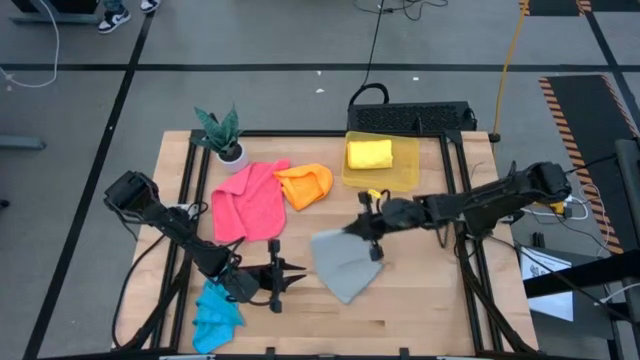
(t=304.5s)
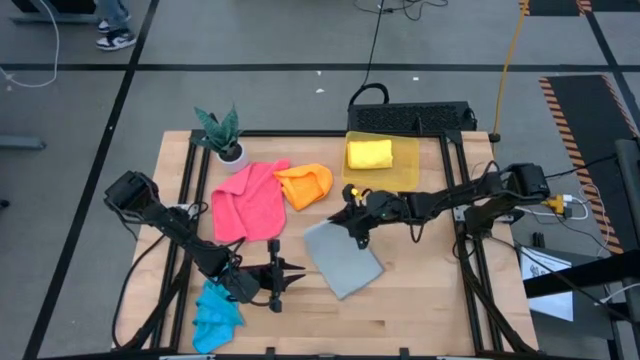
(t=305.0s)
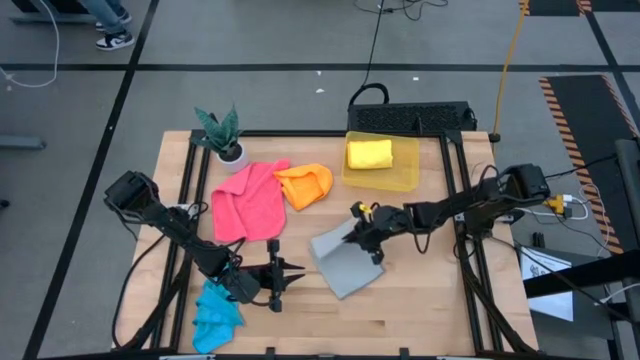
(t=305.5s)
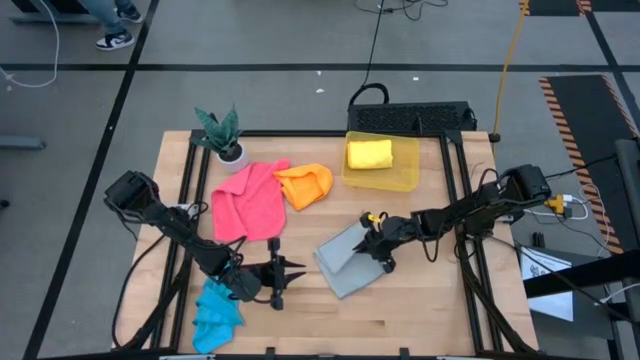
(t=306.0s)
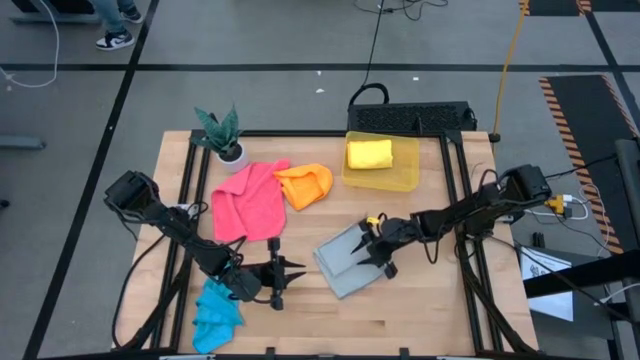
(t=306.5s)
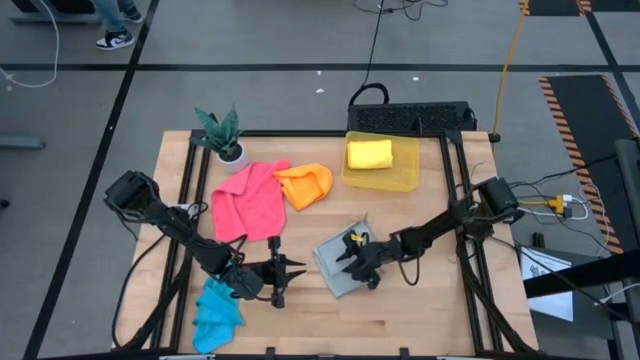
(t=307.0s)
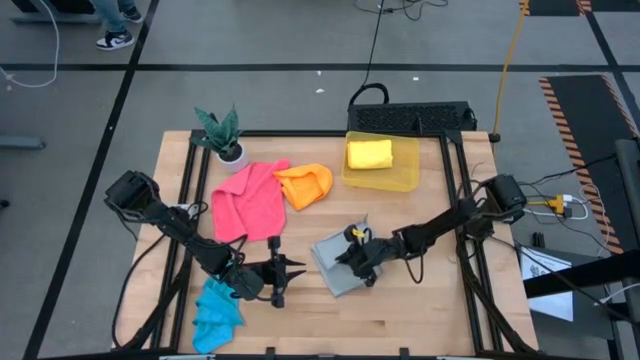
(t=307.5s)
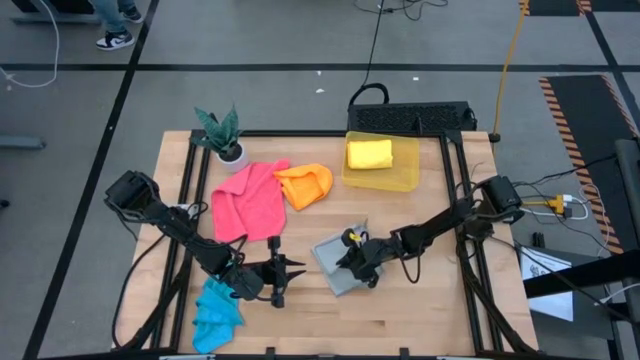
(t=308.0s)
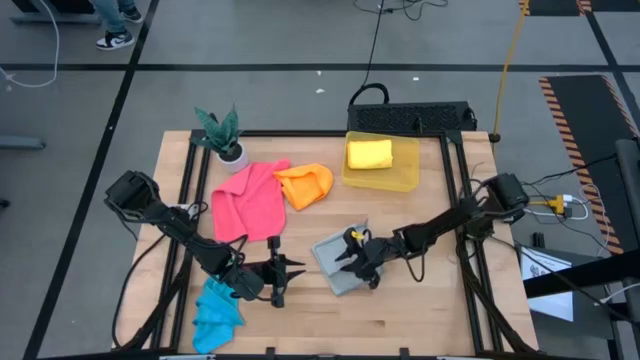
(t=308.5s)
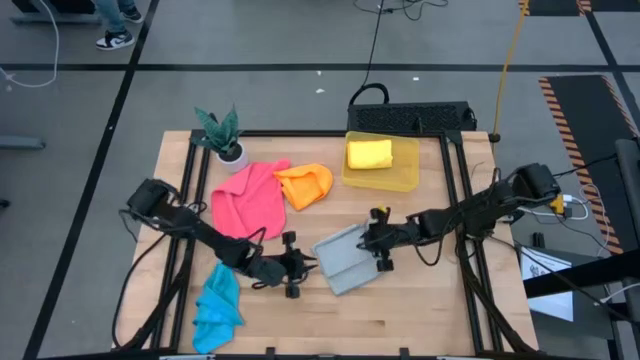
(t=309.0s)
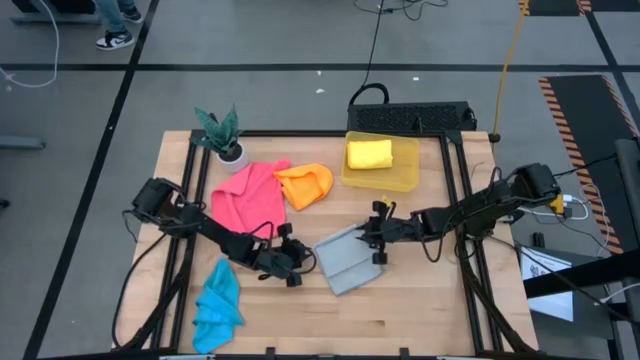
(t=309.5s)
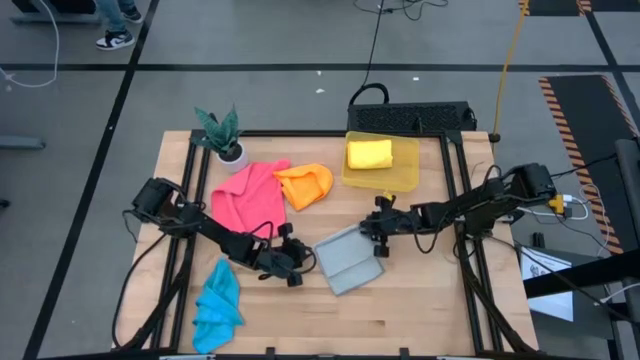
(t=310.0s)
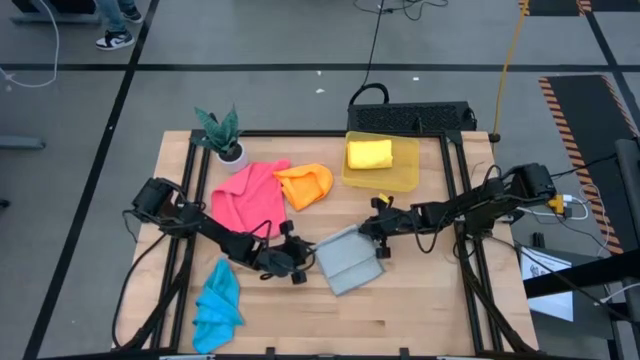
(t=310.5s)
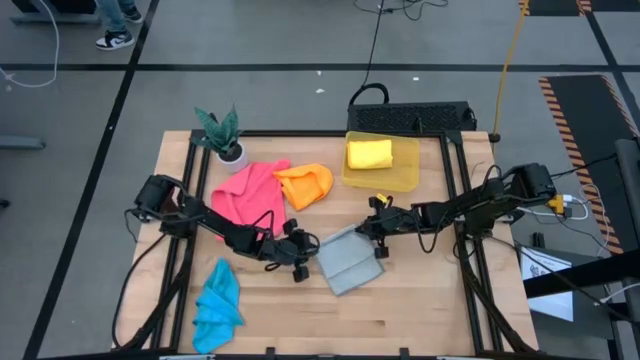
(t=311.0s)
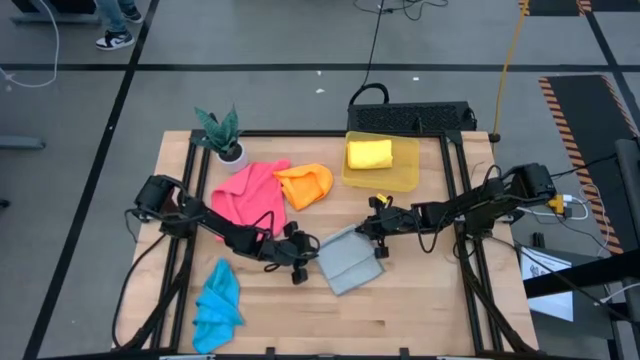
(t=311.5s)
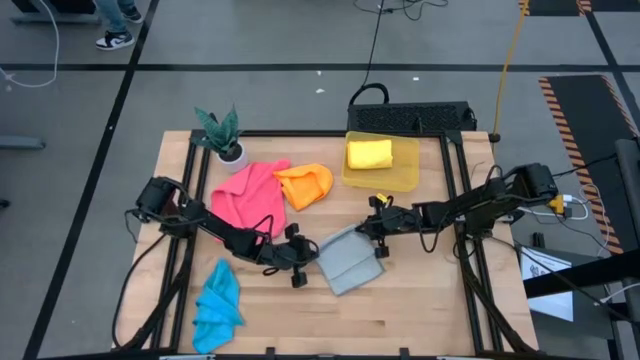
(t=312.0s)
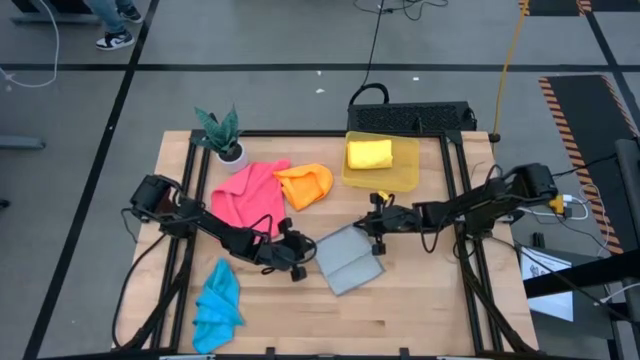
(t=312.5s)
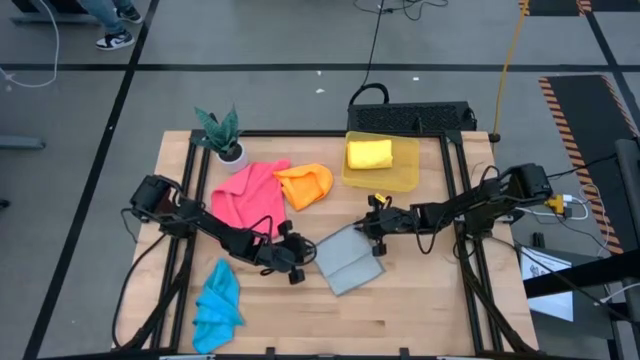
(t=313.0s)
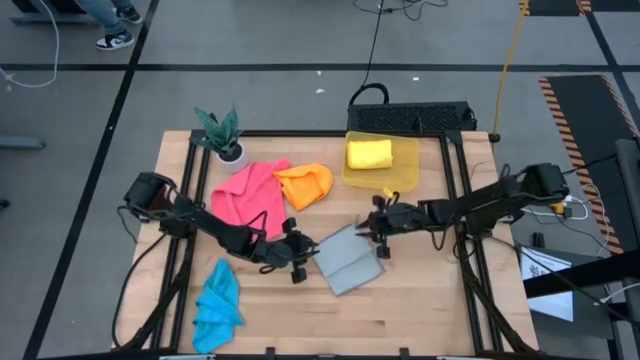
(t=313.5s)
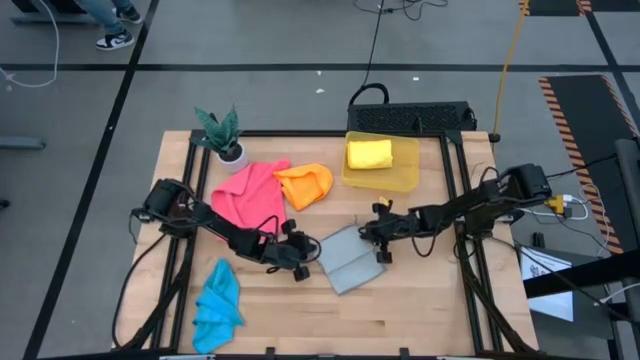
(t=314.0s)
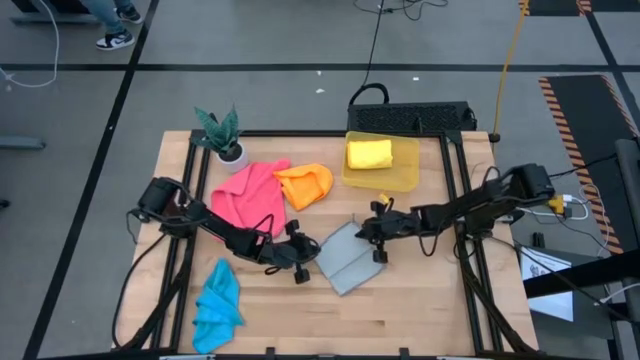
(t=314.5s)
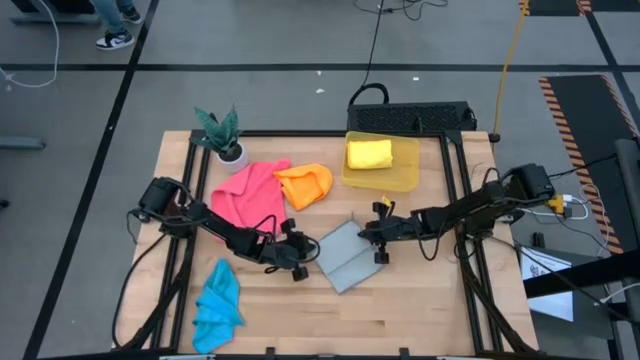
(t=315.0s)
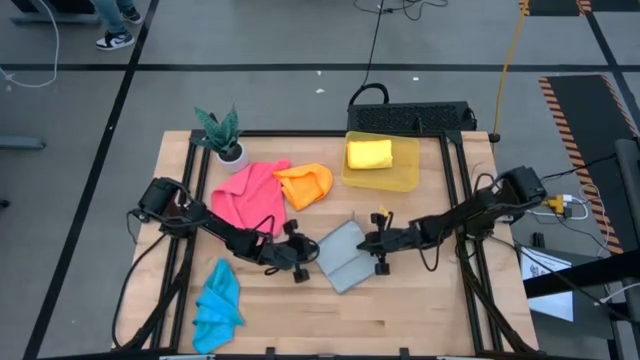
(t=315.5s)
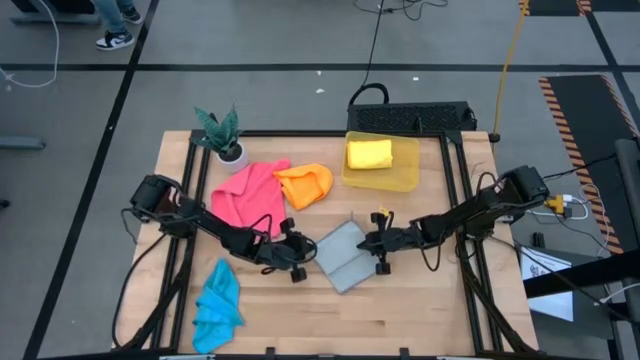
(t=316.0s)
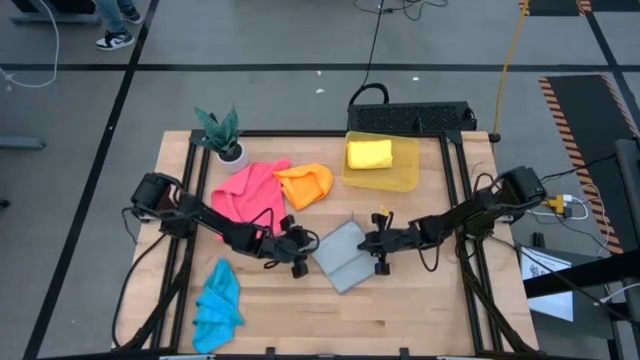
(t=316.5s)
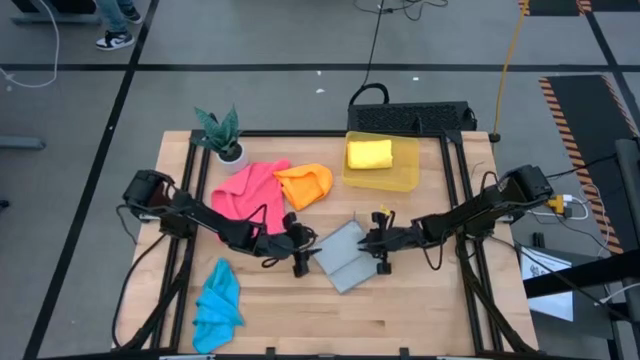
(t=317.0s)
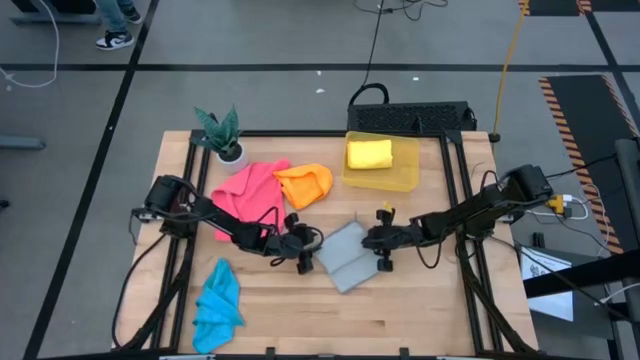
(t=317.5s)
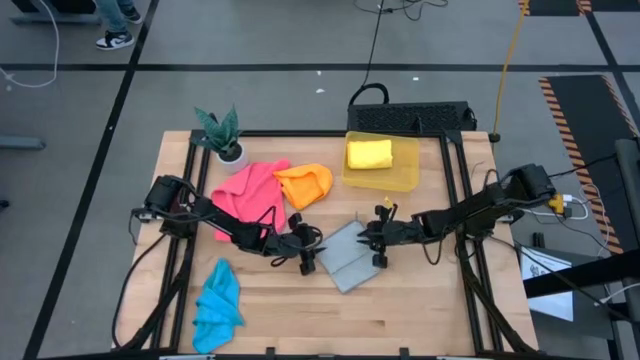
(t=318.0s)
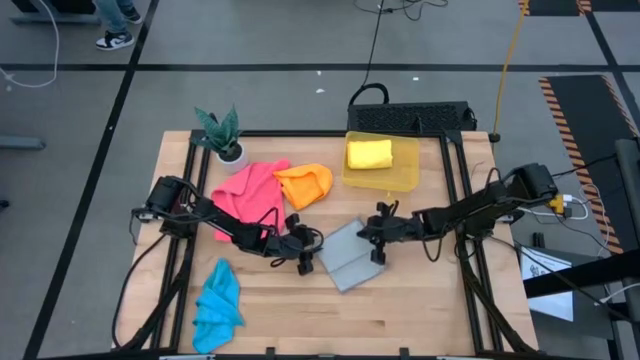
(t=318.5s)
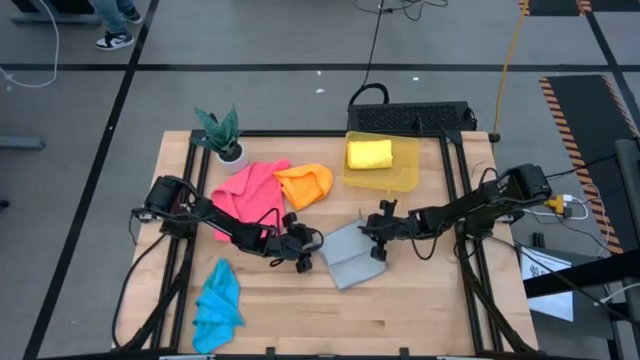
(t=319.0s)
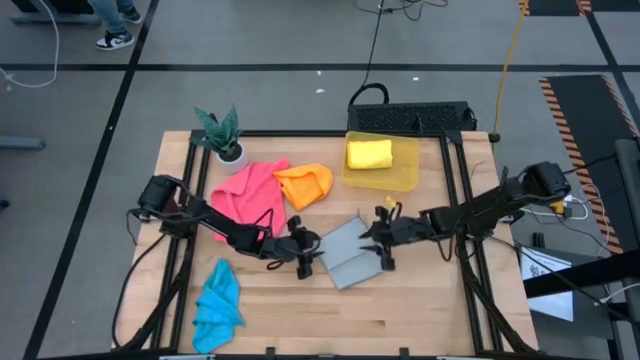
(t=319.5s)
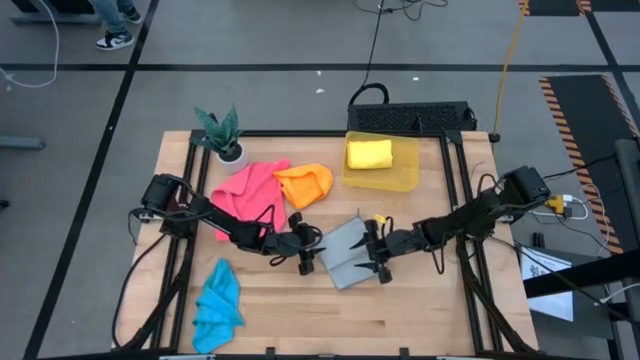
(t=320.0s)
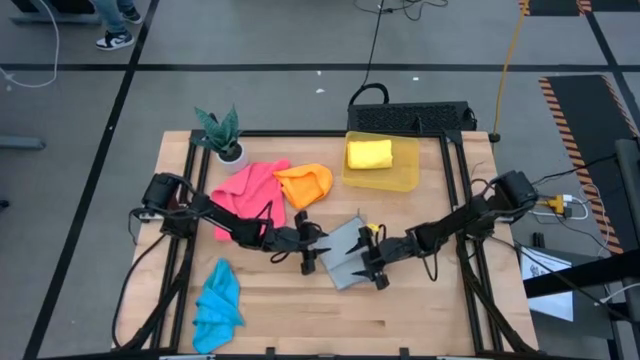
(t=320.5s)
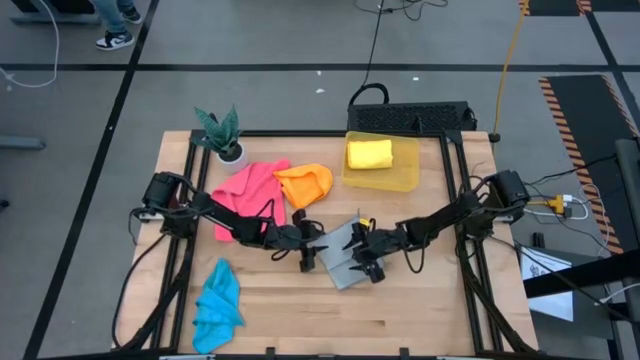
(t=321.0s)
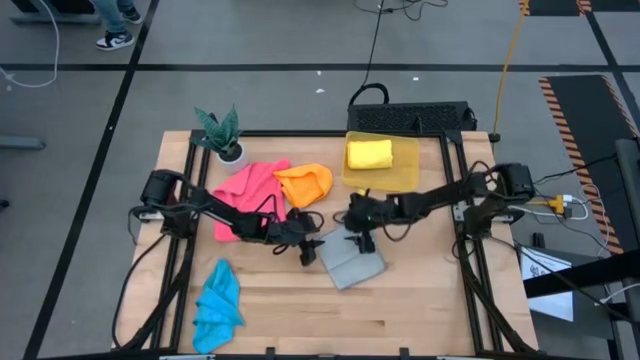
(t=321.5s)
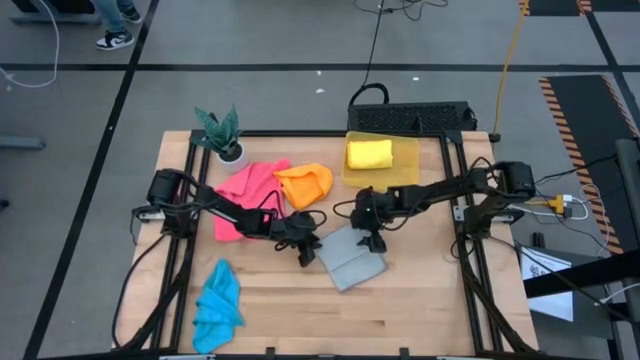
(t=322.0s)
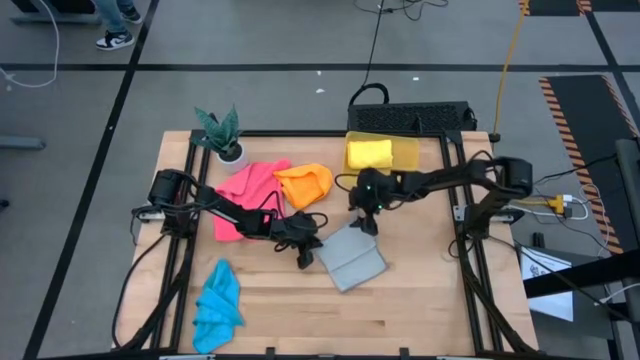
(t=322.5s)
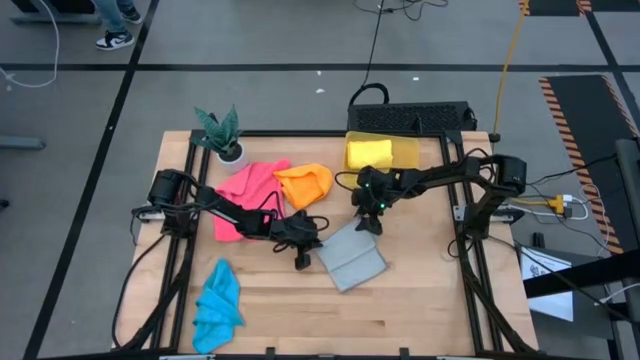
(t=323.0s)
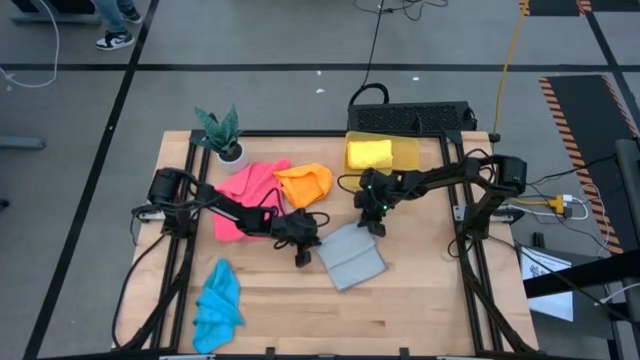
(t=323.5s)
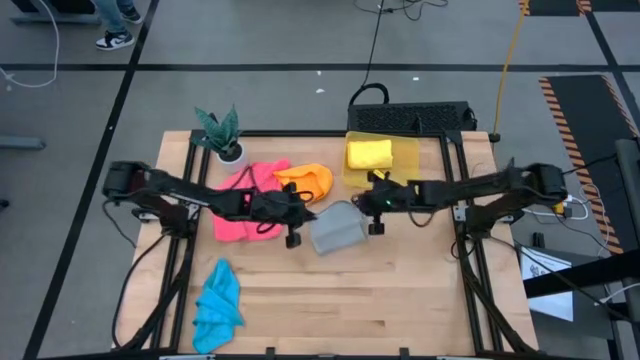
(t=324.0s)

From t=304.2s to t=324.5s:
Task: Fold microfiber towels
Fold the gray kitchen towel
